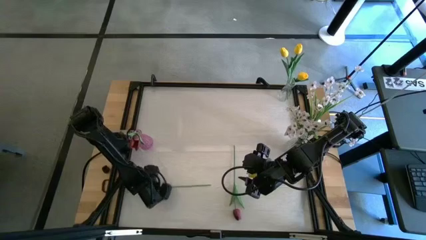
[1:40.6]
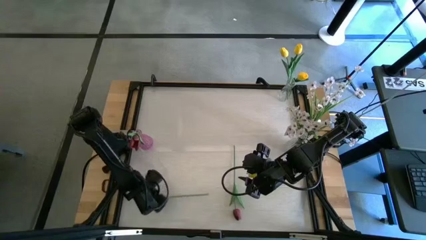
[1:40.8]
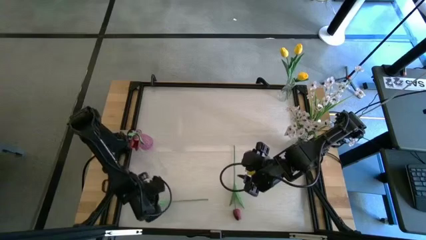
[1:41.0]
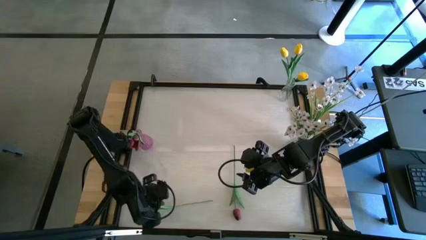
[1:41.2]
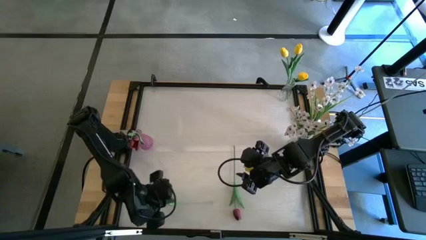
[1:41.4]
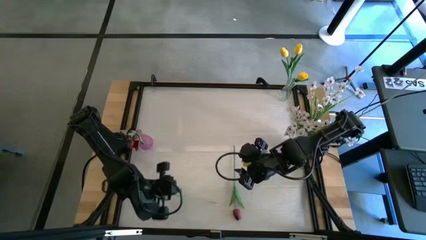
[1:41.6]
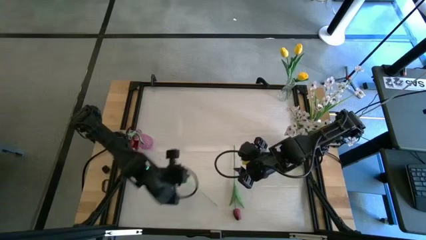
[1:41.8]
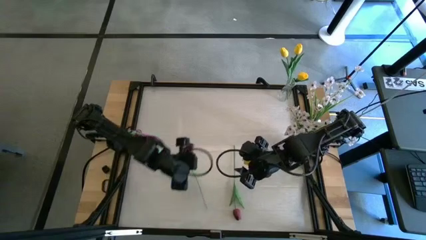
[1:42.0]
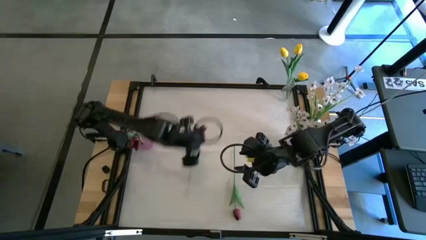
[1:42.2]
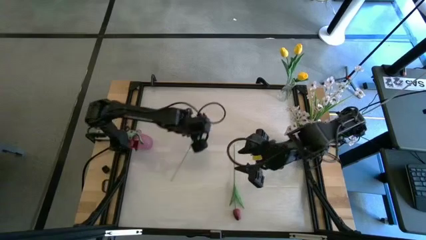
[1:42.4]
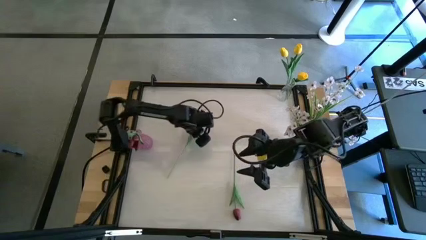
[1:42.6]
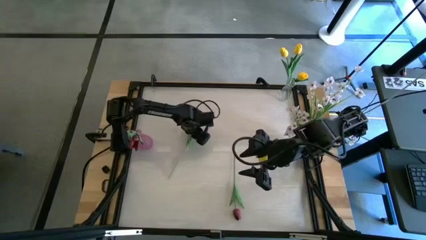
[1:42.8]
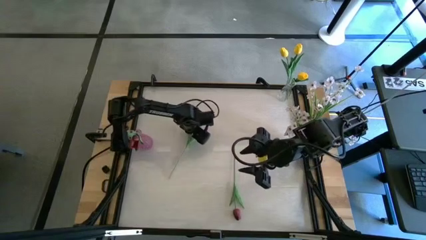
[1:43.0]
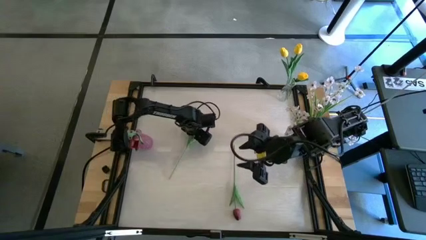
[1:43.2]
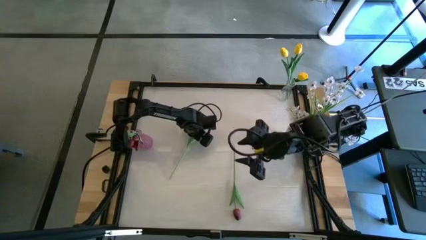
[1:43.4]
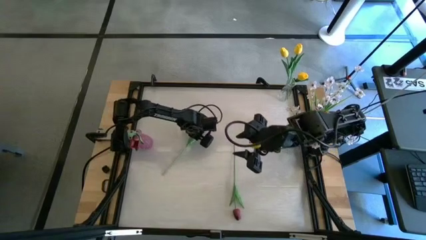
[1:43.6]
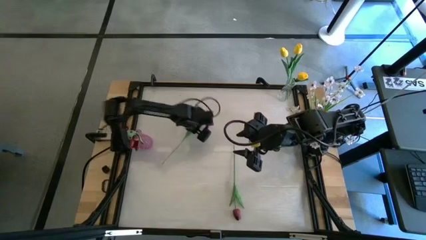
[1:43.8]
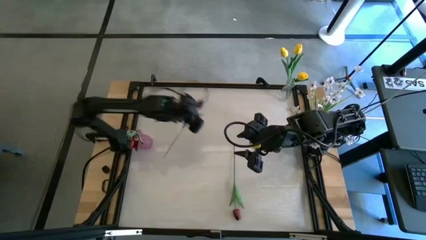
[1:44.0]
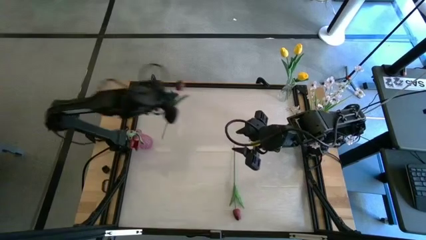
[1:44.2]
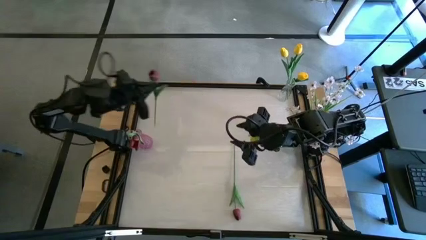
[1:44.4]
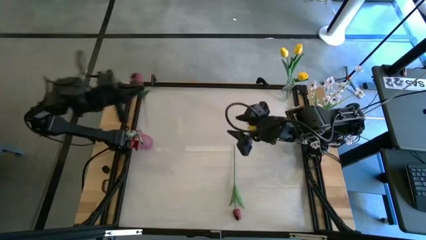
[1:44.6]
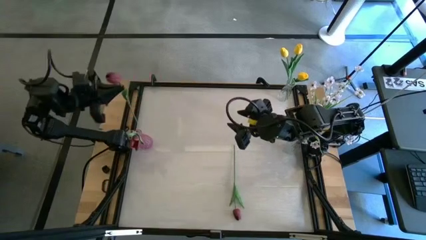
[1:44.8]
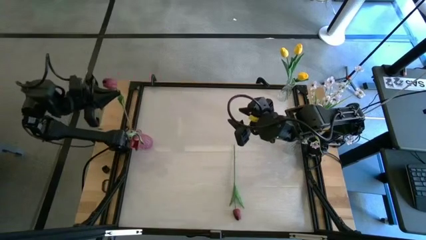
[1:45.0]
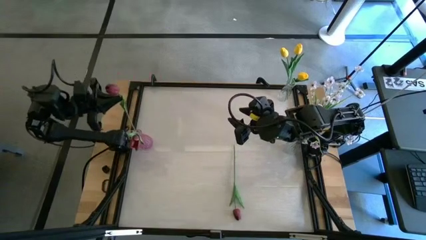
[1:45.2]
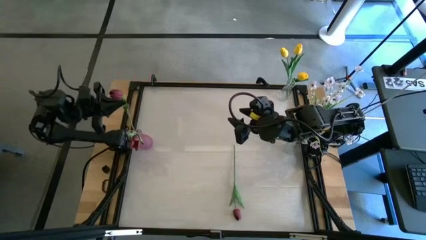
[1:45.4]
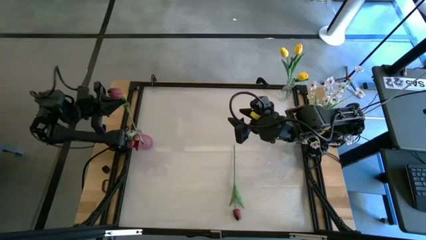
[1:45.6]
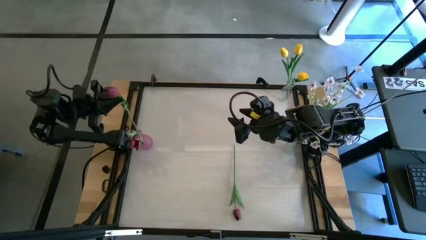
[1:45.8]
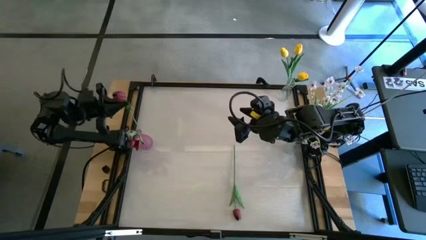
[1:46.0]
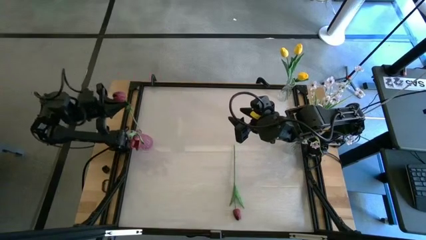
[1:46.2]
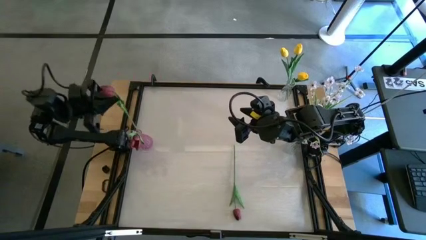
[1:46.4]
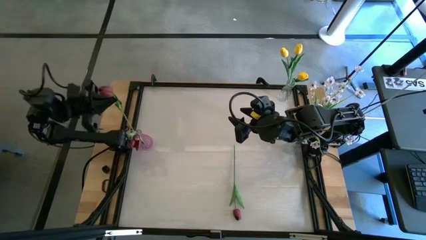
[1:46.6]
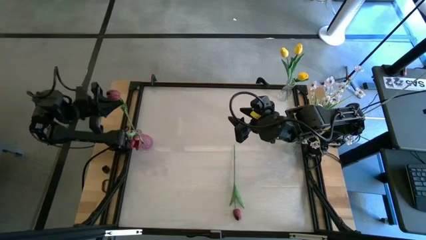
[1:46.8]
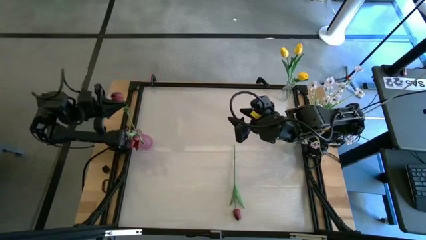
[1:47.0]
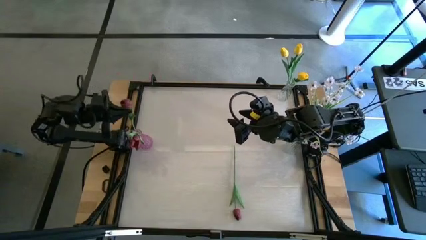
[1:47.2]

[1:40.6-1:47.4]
Task: Sort flowers into vase by color
Put the left red flower into the purple vase

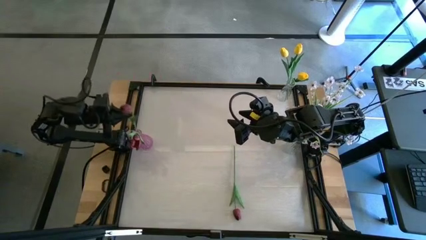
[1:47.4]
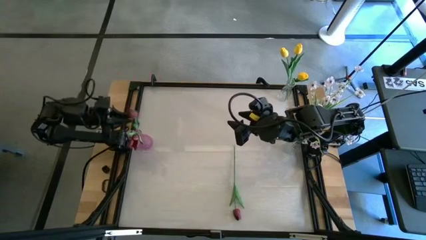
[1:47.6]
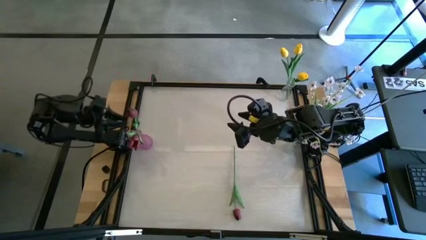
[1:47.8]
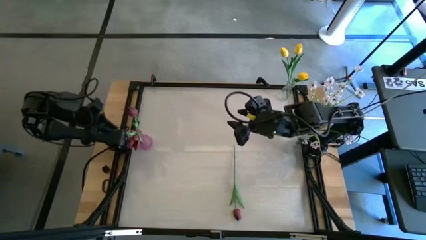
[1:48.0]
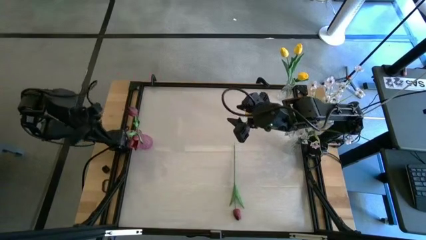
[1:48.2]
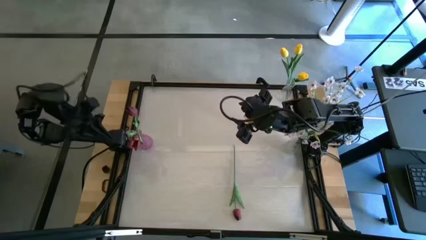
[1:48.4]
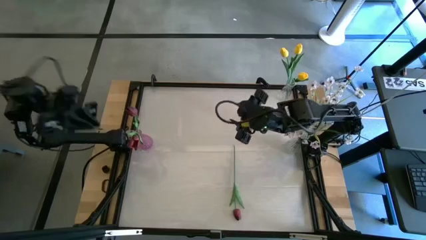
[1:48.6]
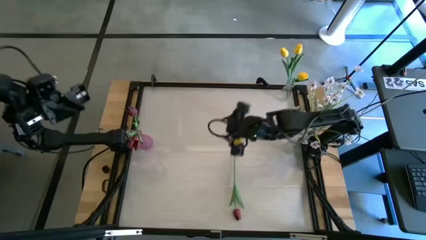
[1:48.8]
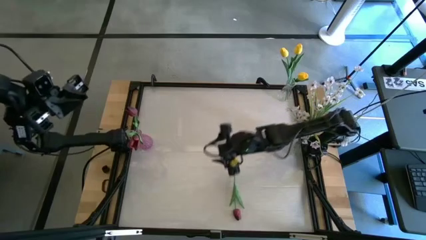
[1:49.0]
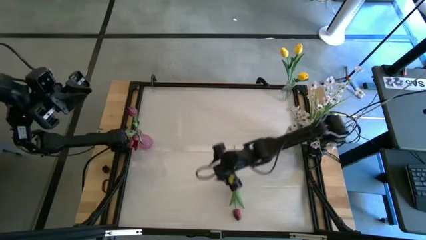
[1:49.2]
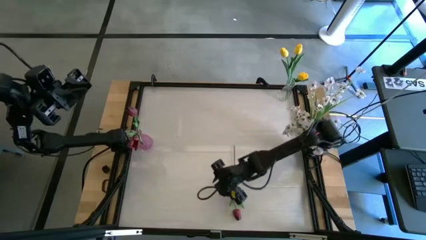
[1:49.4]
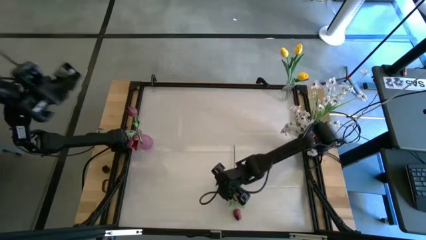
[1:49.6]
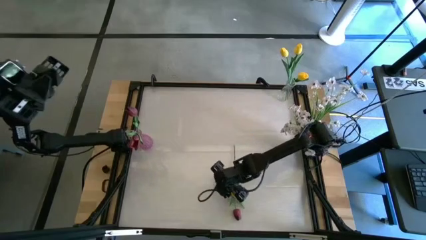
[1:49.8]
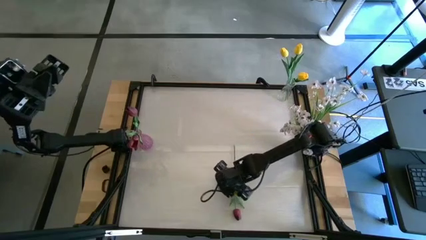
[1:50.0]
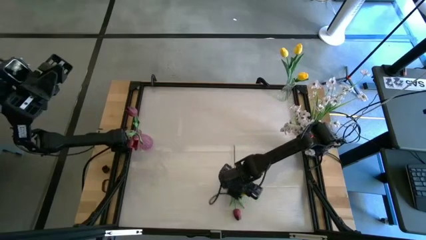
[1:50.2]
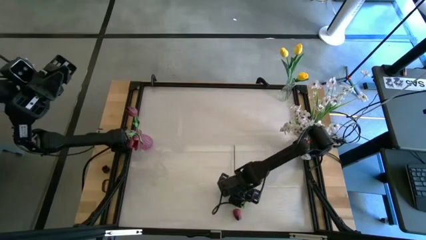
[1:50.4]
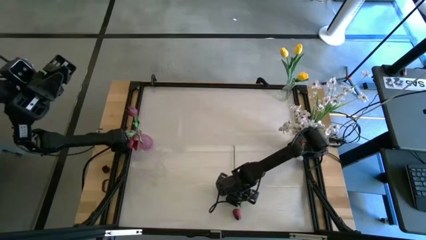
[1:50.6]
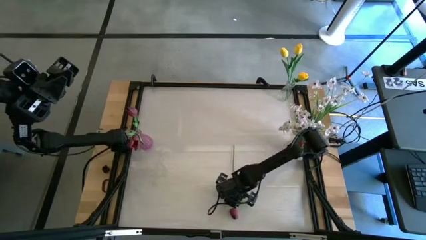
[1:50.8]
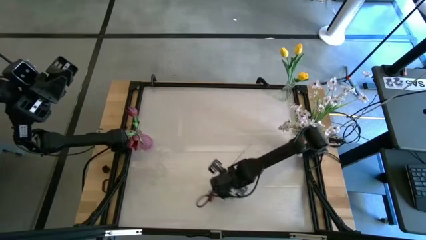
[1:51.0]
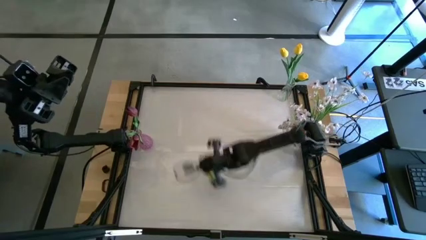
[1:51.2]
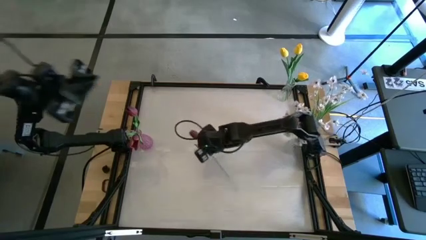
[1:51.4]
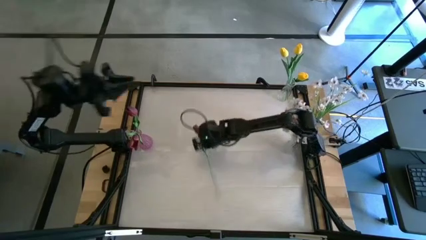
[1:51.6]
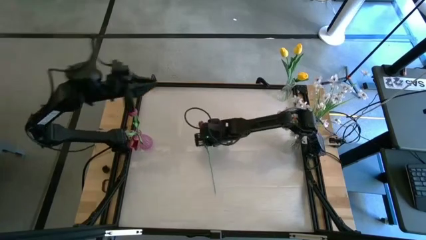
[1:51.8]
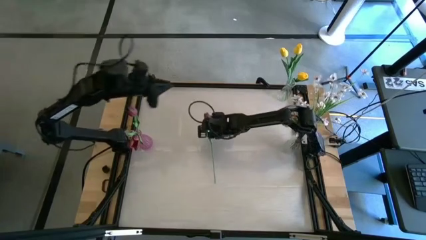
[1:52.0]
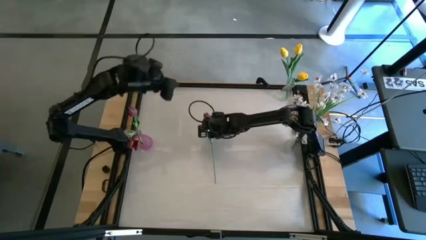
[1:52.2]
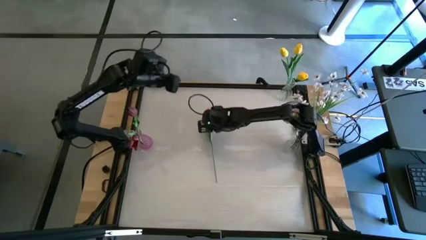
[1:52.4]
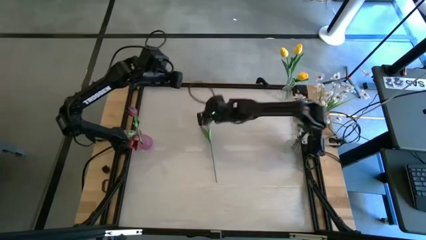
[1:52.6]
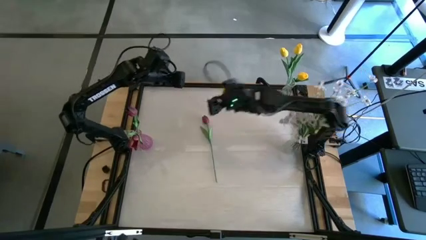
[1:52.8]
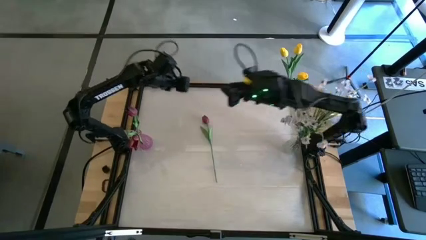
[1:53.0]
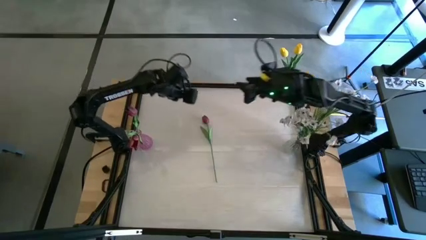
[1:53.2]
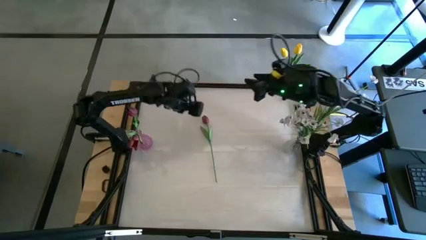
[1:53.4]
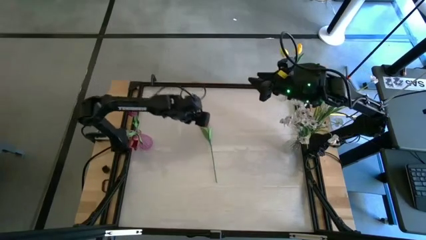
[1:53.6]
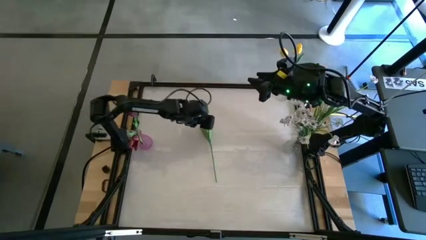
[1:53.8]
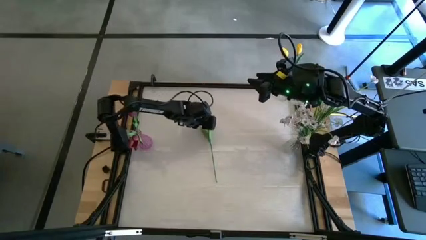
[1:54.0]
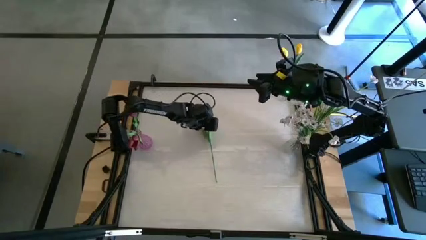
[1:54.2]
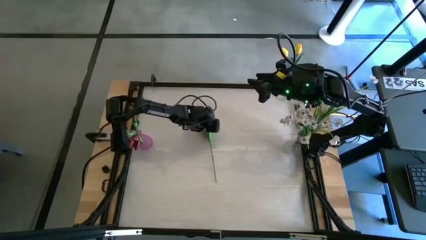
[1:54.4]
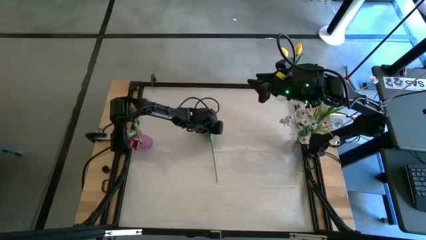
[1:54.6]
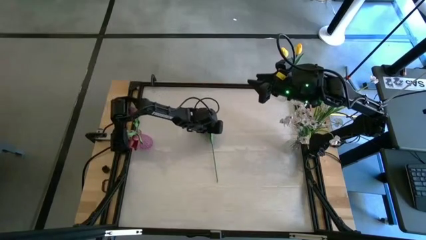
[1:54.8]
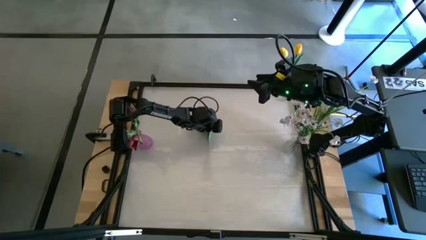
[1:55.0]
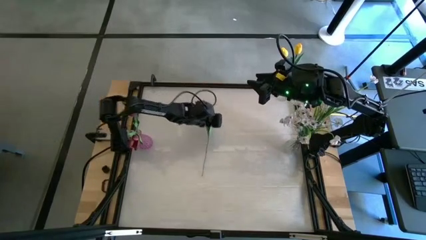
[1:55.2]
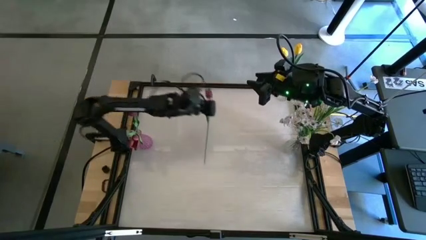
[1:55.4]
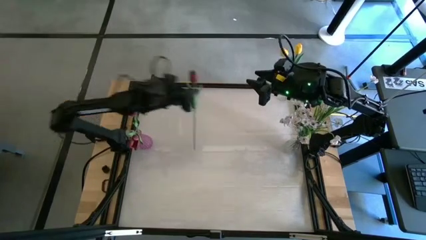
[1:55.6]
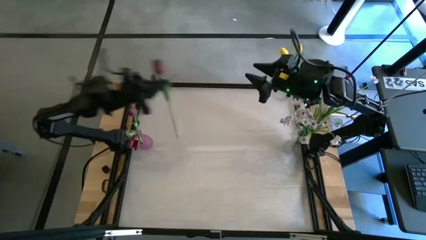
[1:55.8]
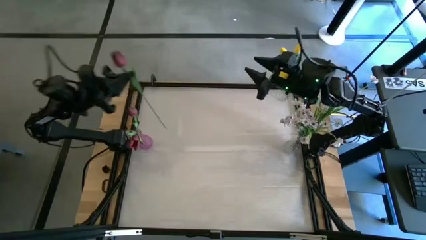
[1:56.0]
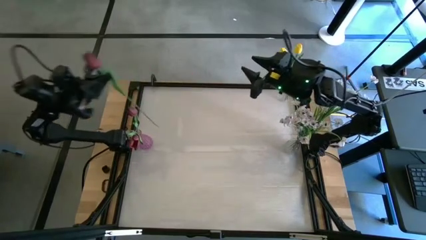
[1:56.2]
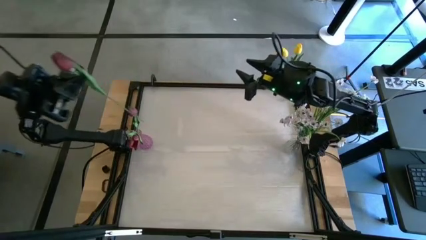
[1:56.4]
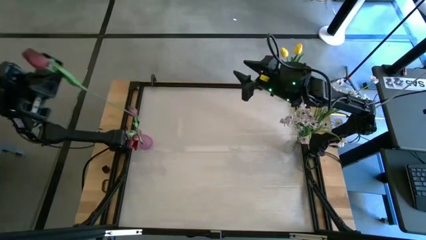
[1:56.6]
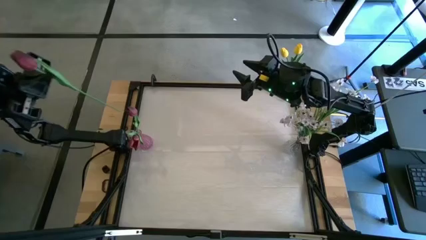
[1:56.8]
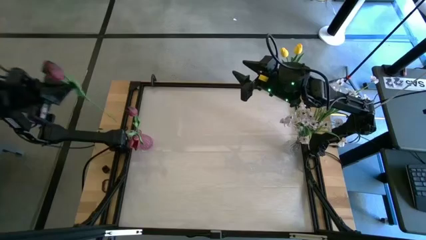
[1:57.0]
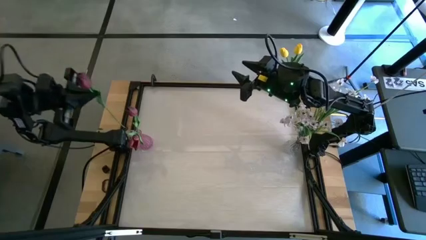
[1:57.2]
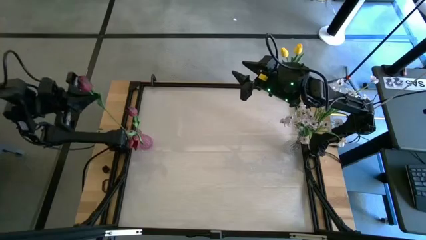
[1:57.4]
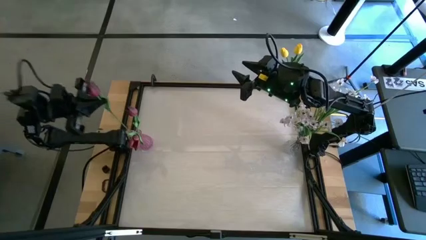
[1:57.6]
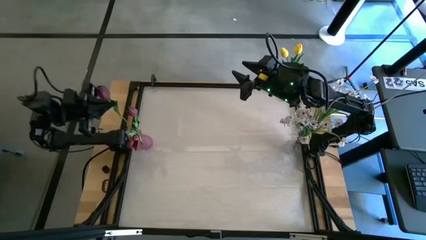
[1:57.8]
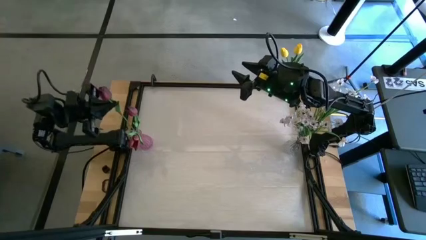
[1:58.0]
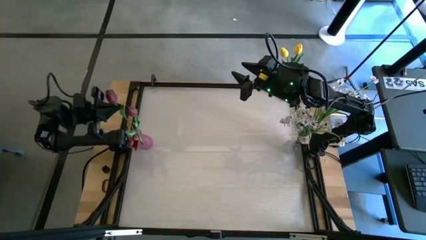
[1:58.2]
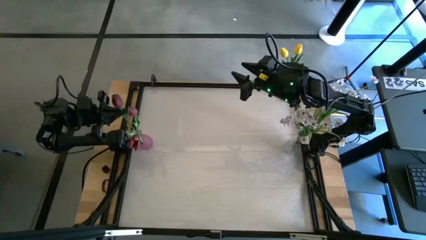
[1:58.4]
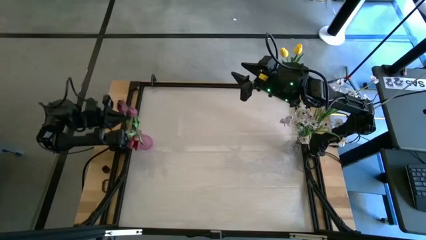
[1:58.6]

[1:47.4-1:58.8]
Put the red flower in the purple vase
